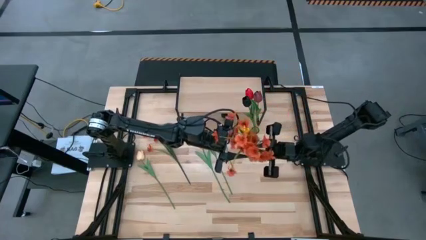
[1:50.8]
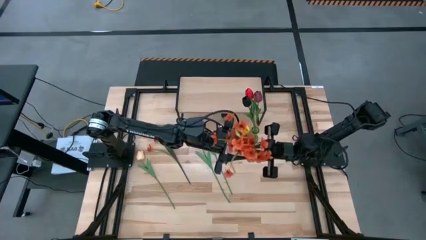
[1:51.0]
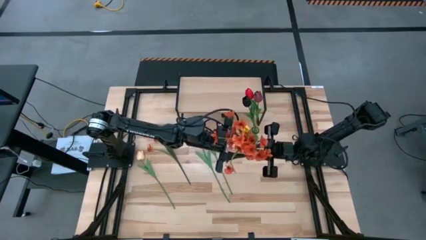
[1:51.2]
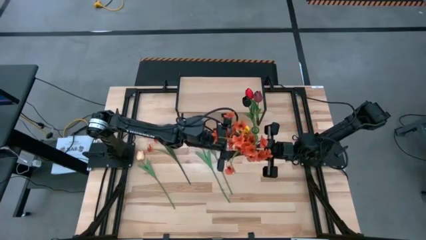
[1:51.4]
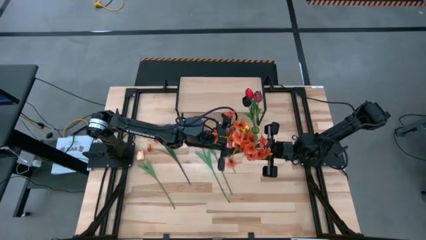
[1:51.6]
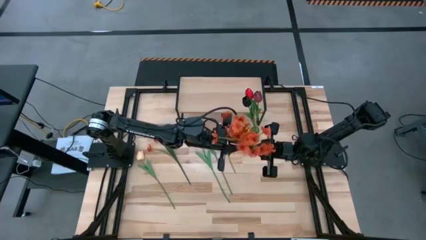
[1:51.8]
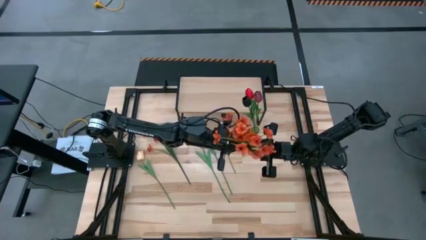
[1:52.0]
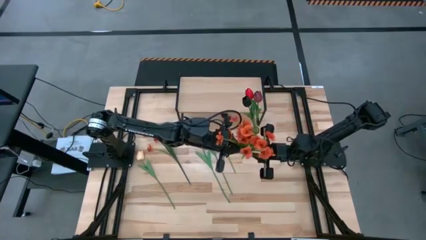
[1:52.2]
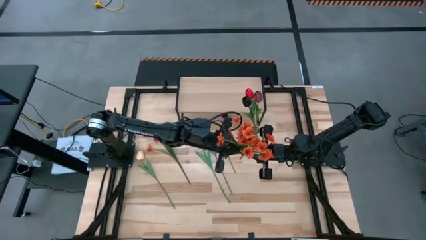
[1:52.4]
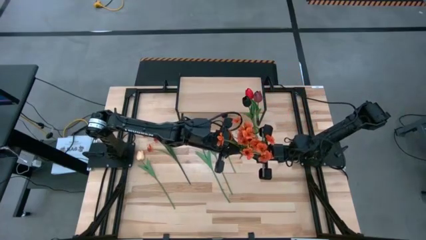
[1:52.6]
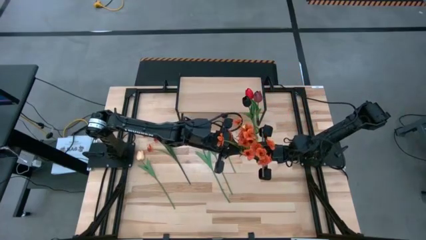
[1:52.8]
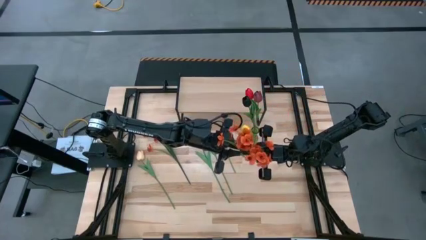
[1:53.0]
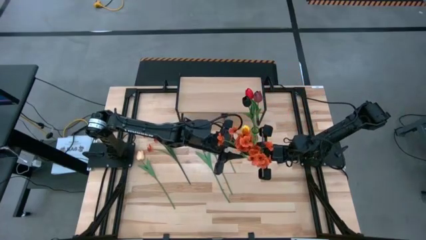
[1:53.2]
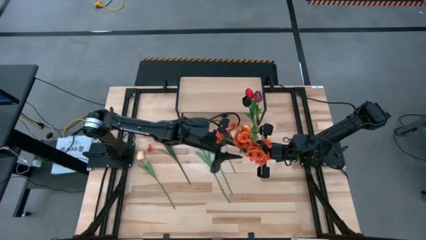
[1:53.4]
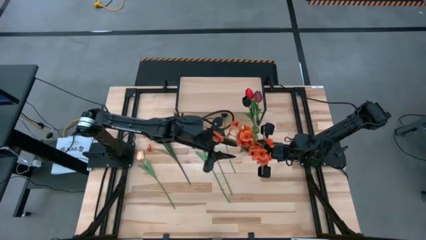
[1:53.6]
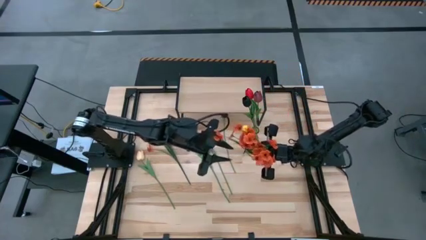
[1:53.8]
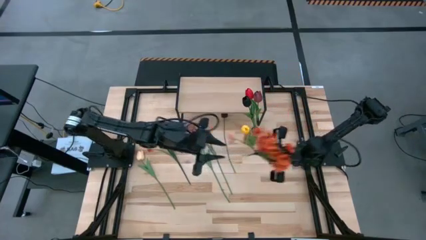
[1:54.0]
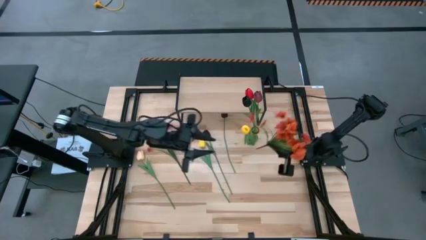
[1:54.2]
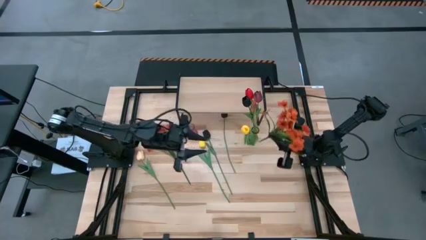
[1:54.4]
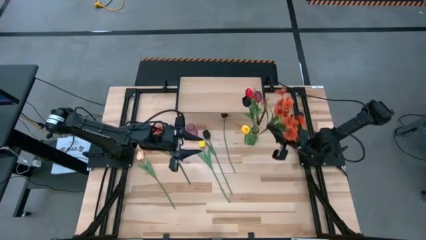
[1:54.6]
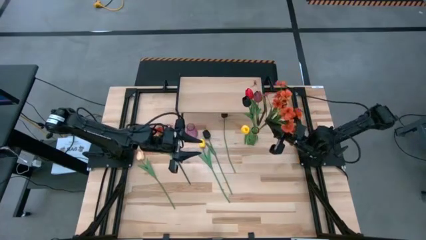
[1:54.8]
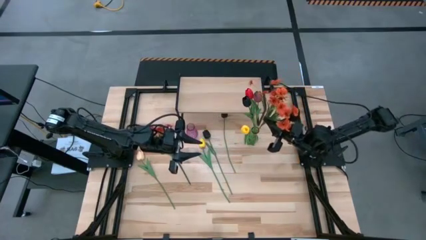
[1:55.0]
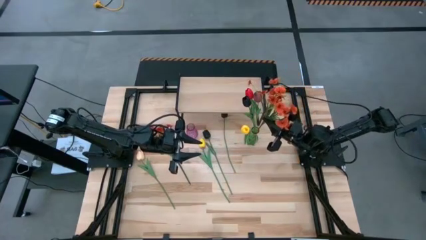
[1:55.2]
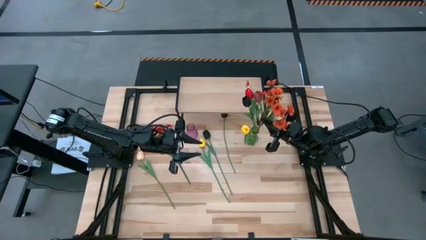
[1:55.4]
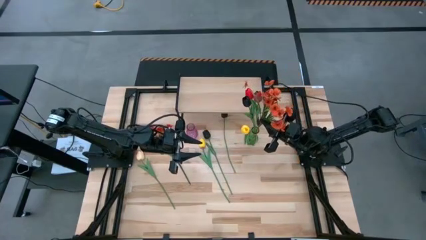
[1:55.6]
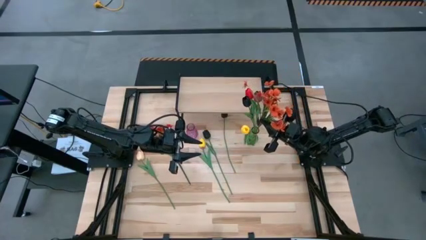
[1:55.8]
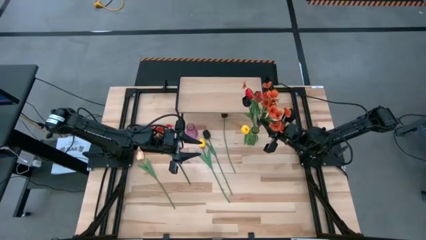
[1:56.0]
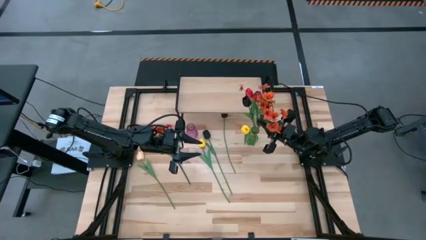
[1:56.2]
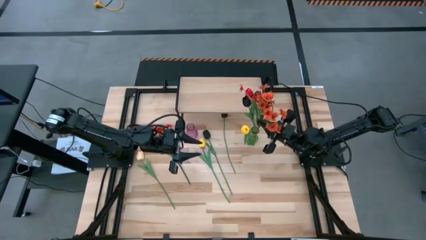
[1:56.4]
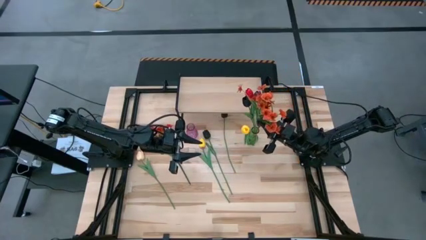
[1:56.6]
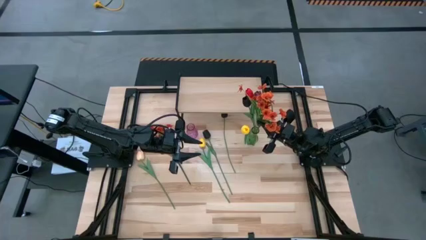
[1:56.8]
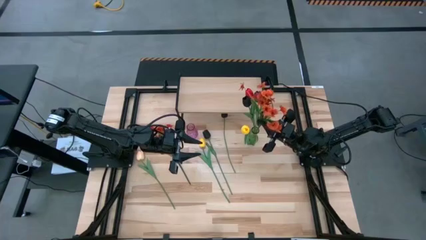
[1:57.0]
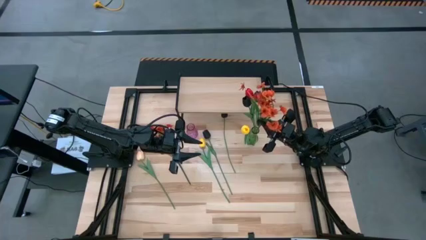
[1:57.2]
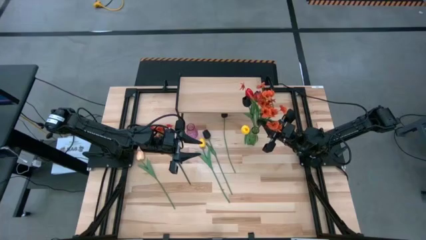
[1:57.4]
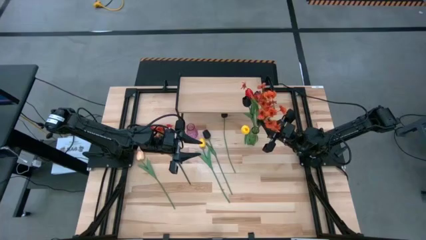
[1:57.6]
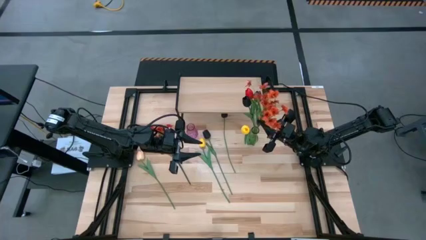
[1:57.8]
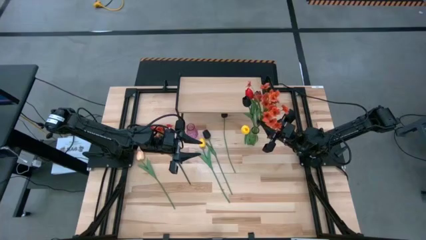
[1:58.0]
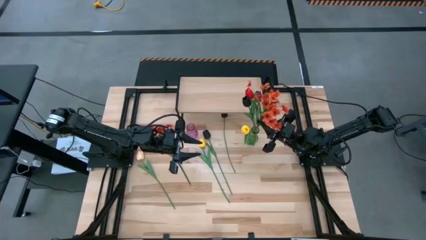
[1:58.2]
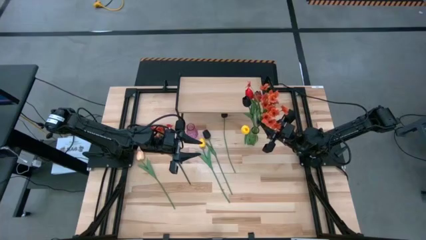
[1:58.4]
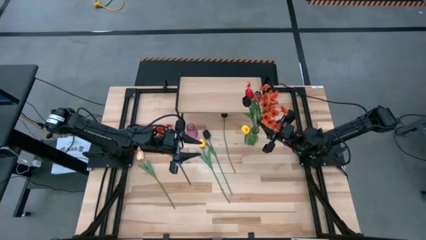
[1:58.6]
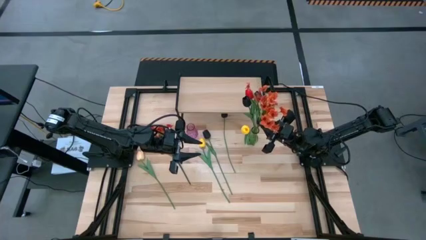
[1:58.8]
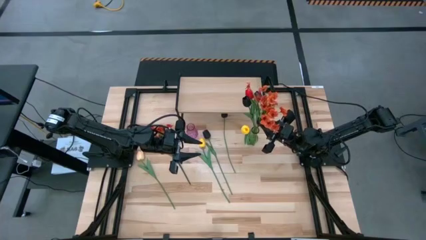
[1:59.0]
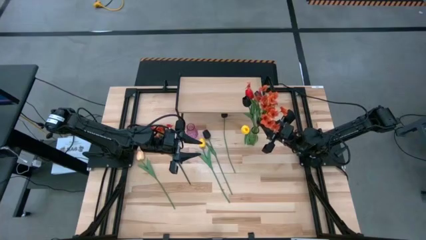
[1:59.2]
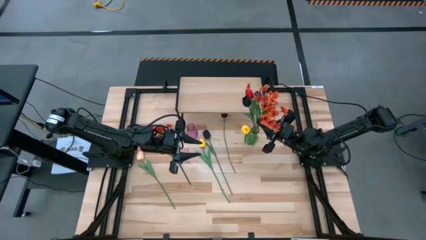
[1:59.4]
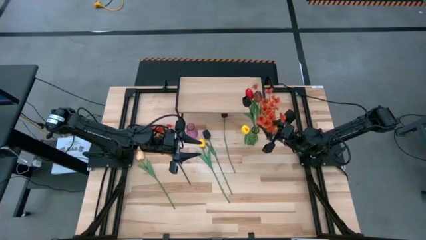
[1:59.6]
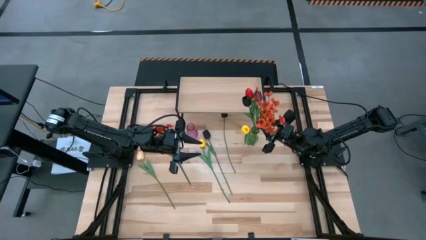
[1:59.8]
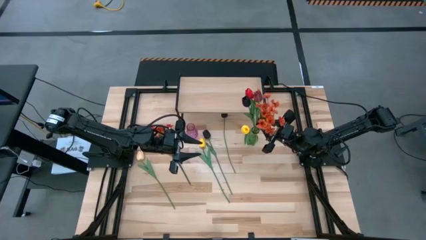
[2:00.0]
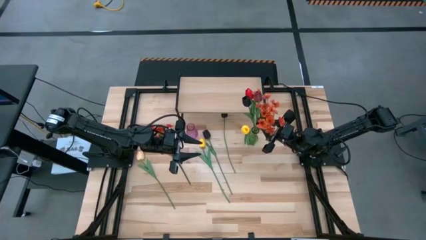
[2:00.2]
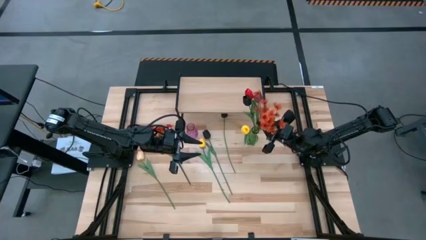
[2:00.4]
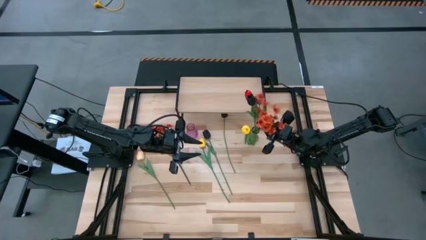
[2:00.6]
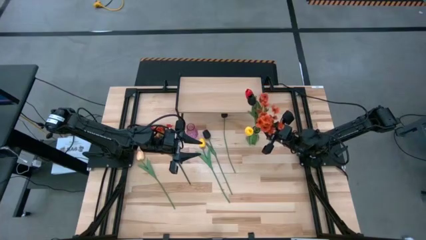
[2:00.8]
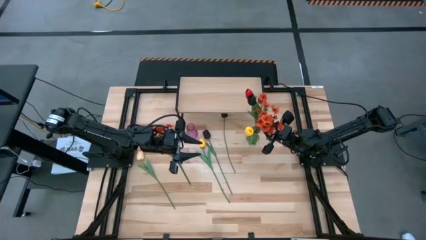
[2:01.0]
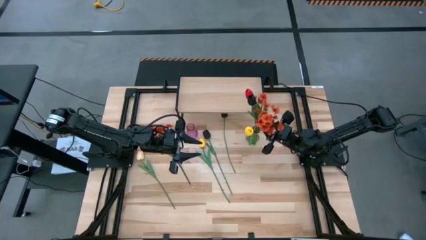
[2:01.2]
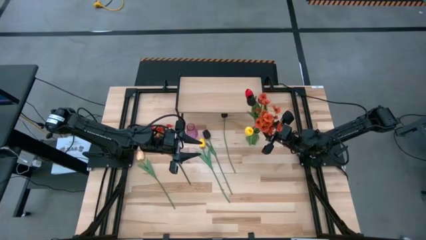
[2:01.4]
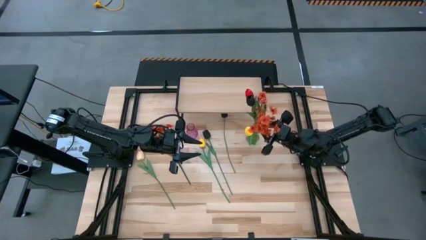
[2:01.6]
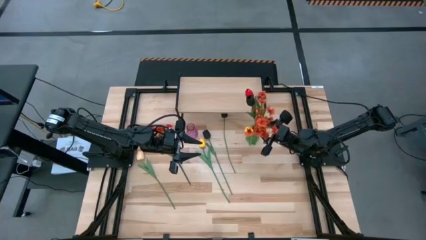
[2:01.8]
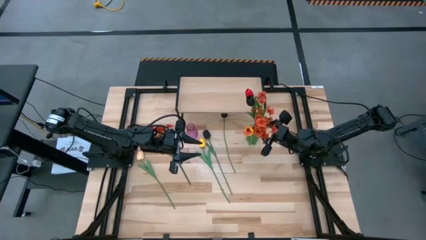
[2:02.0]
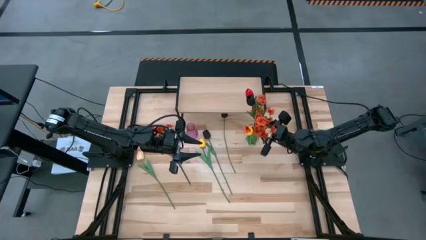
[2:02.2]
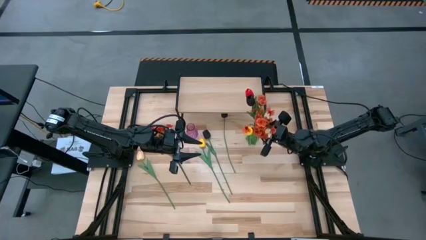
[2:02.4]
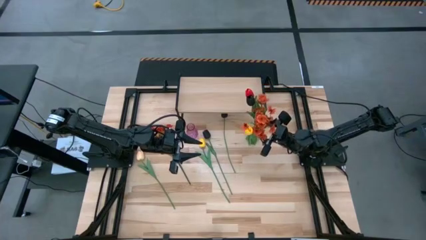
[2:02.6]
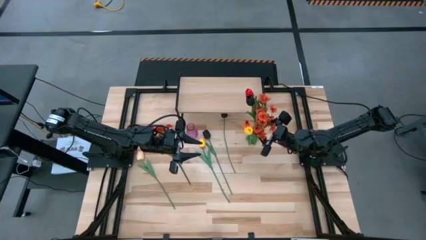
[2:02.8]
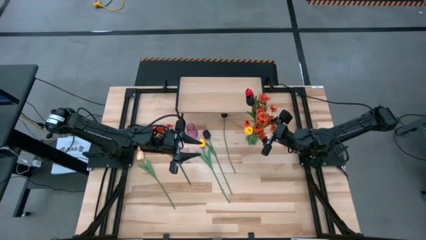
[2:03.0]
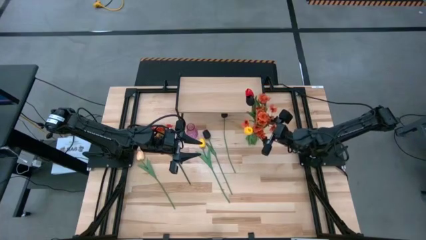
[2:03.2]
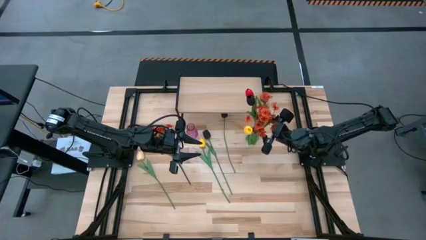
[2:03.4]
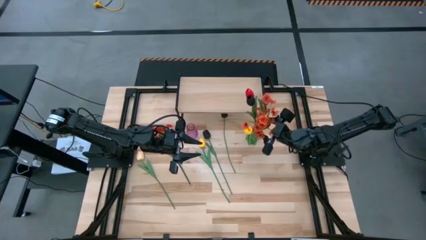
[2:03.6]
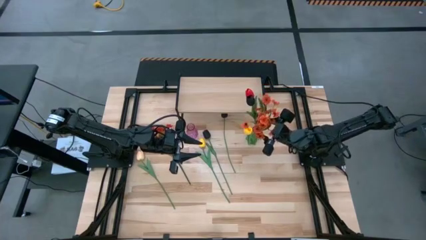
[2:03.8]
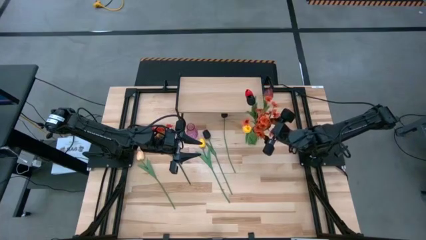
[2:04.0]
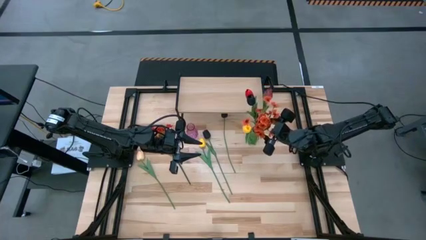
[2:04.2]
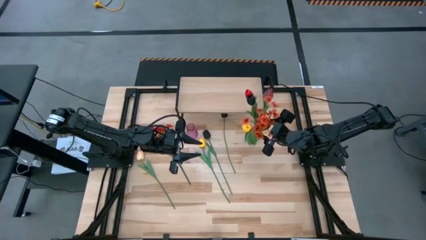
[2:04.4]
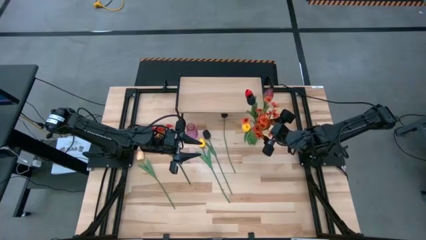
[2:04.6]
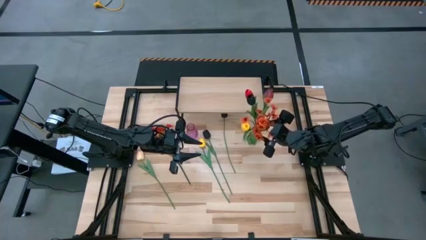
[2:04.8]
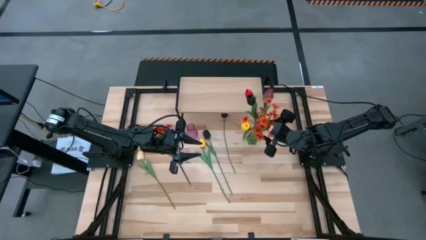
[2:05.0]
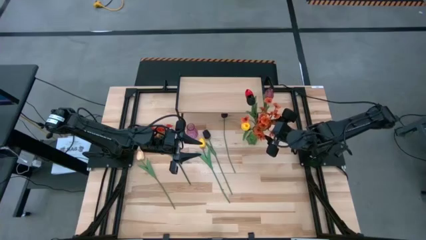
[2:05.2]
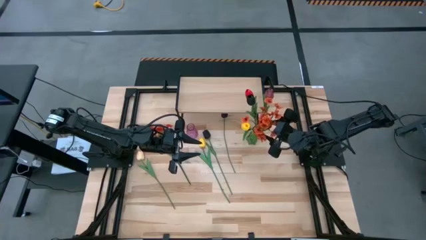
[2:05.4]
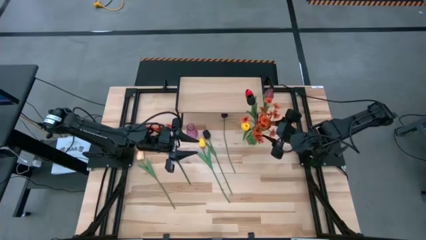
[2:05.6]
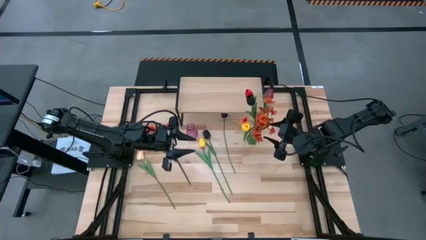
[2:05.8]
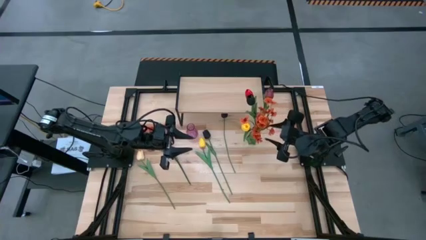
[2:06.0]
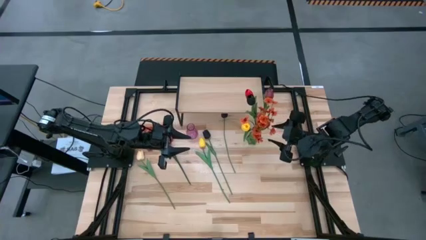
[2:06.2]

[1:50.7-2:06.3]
Task: Pick and place flowers into a vace then onto a shelf
Put the right orange flowers into the green vase
